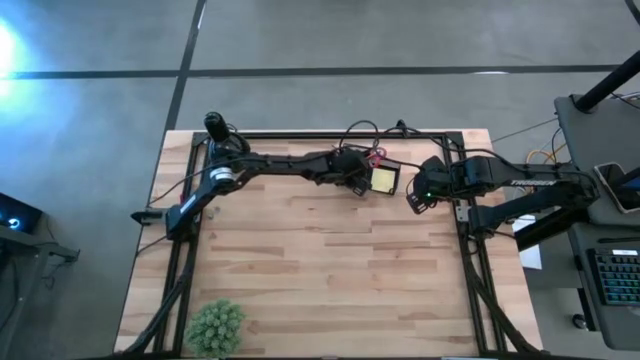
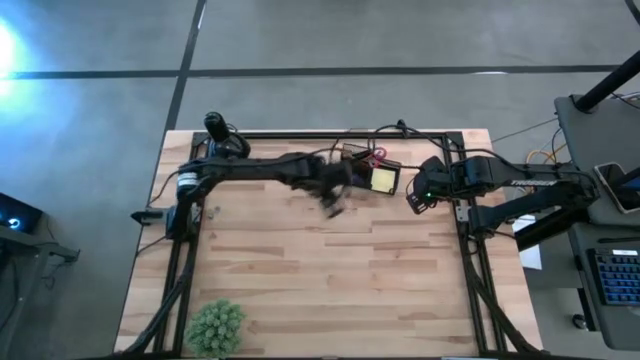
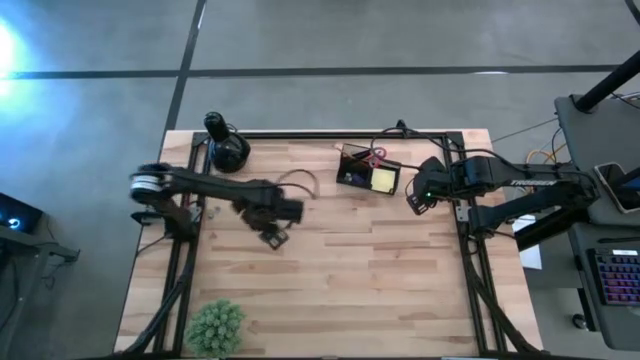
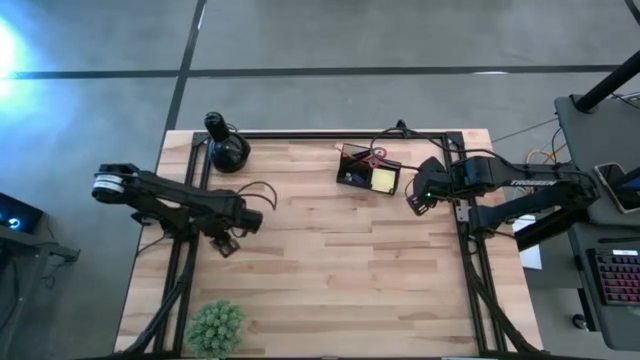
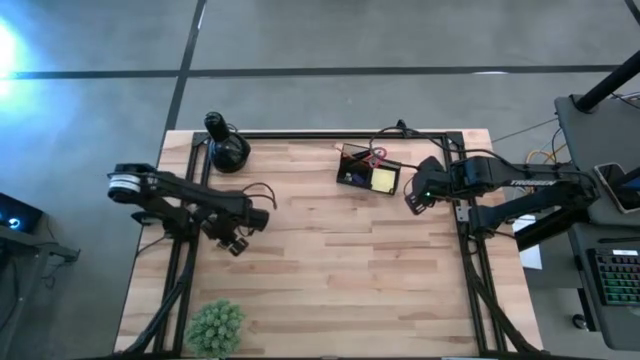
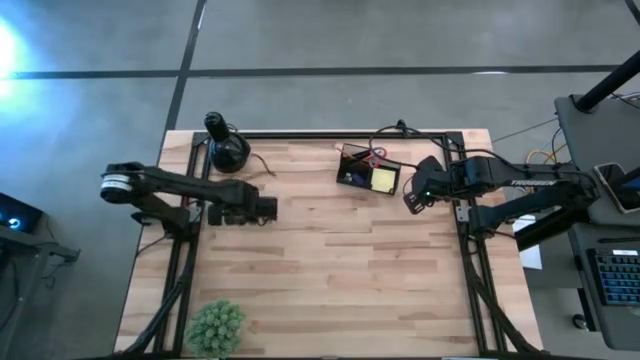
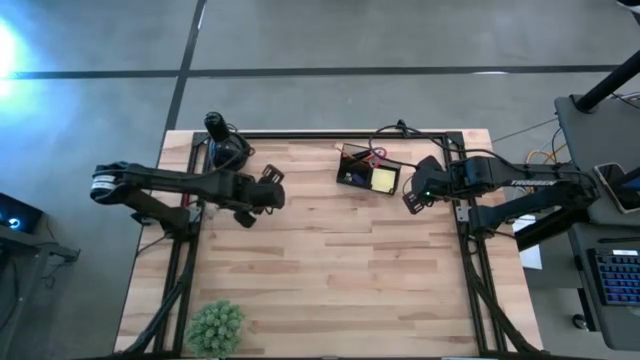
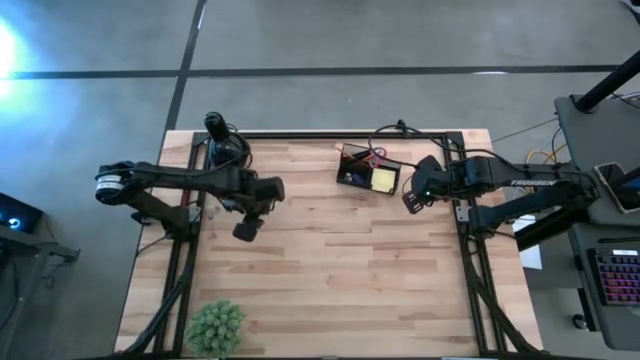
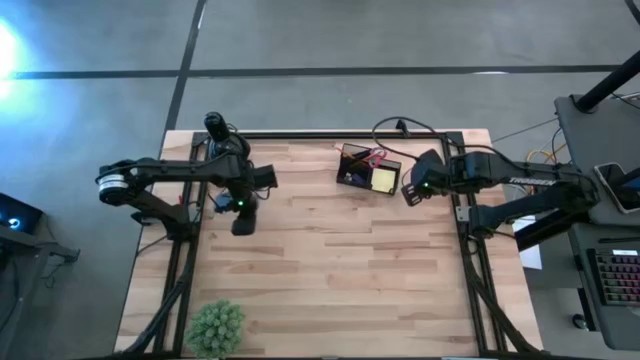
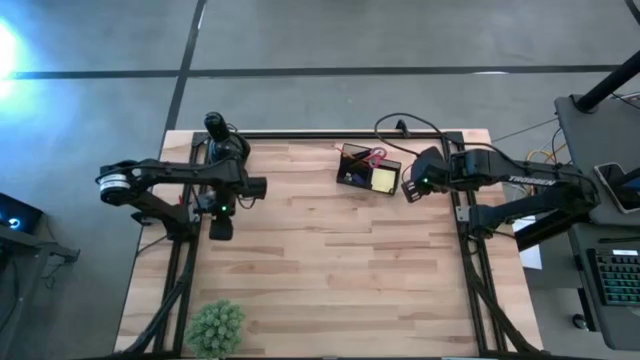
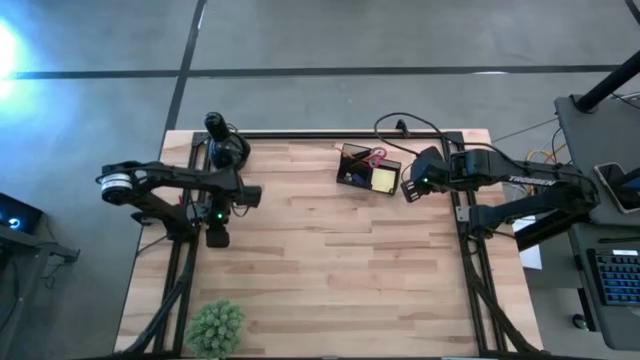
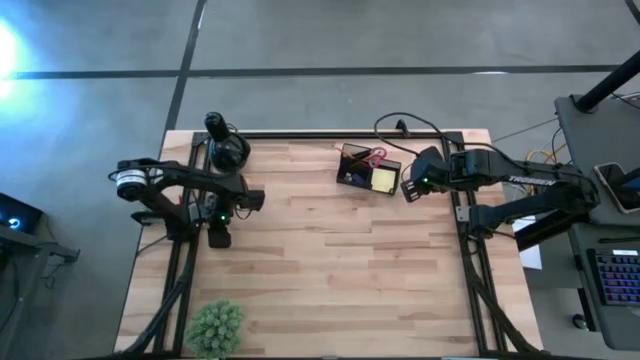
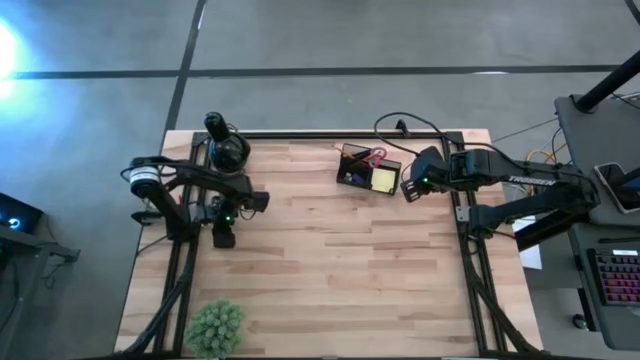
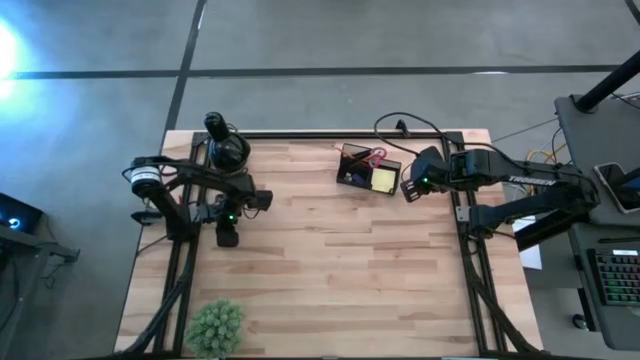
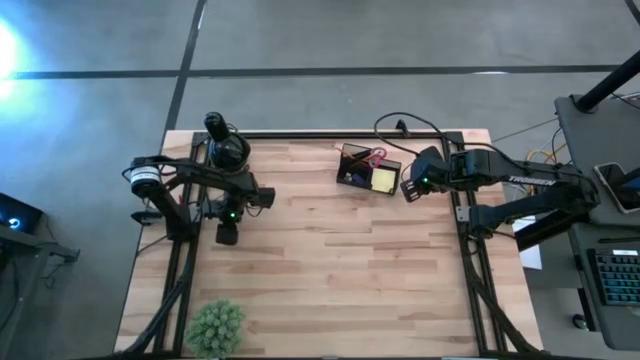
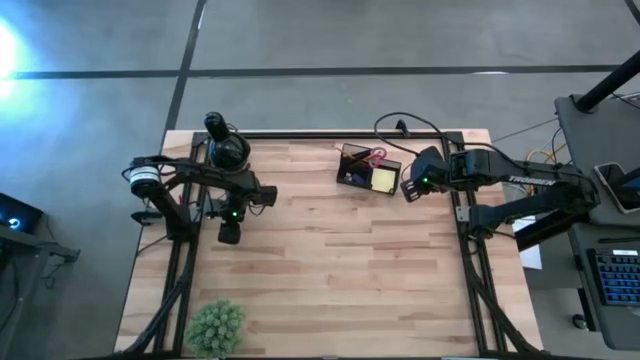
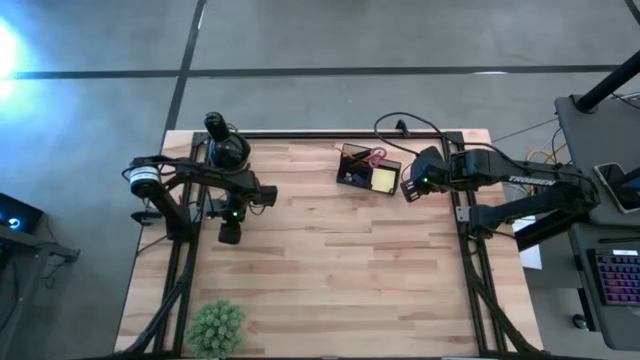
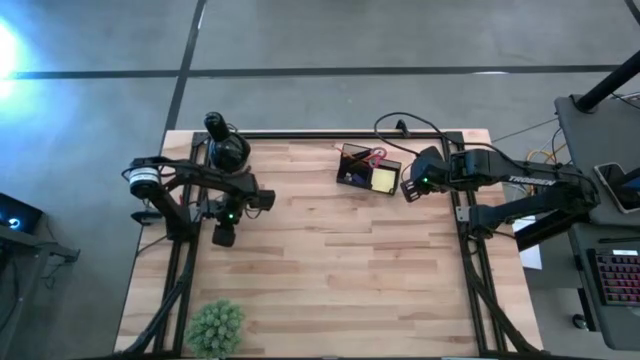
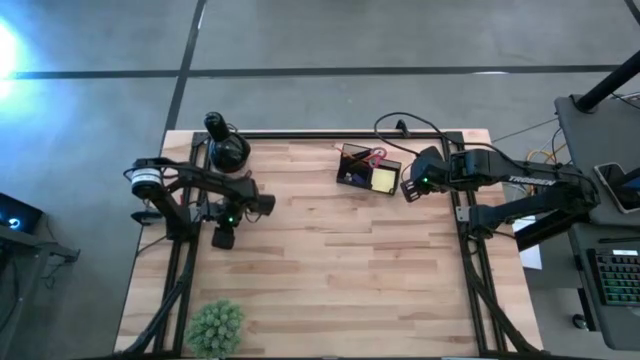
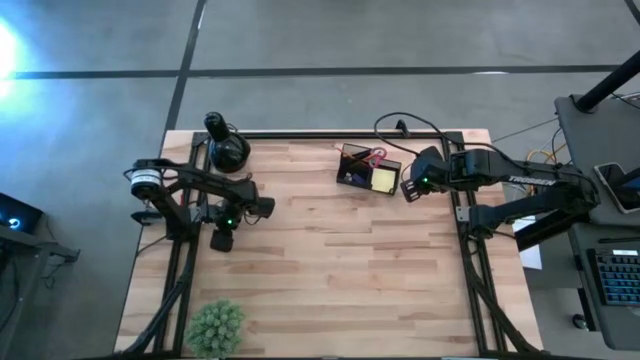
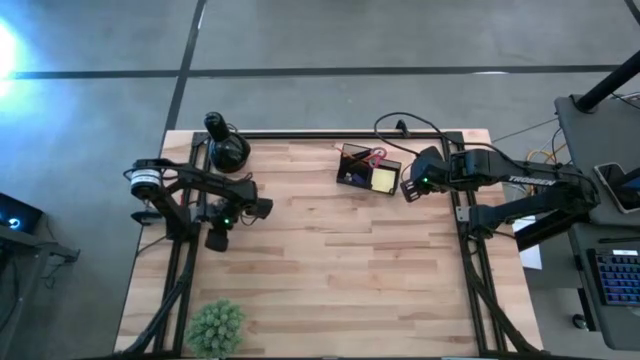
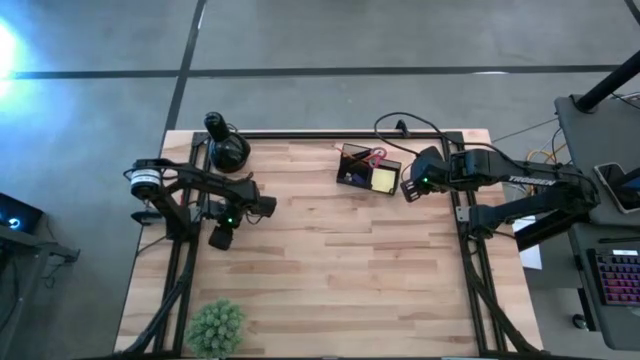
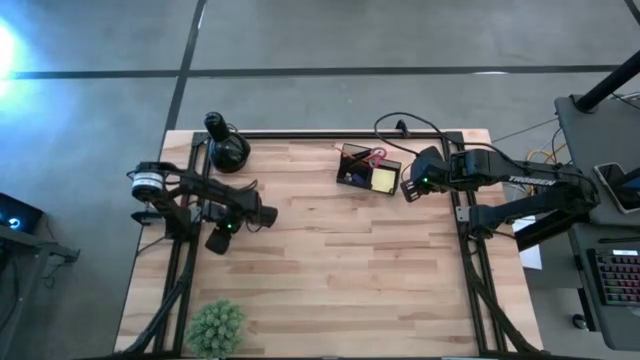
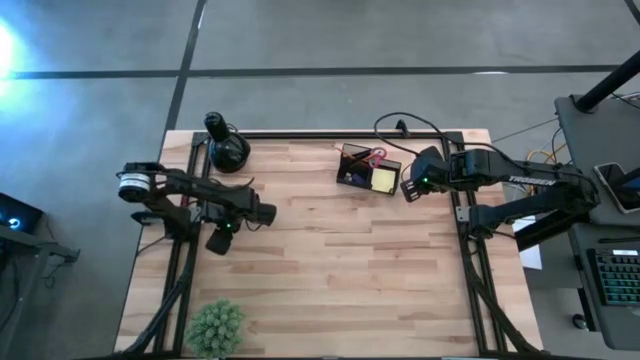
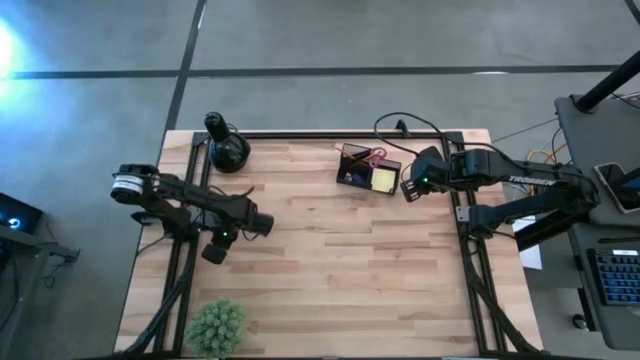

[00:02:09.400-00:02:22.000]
Task: Pick and place office supplies into organizer
Put the pink binder clip into the desk organizer

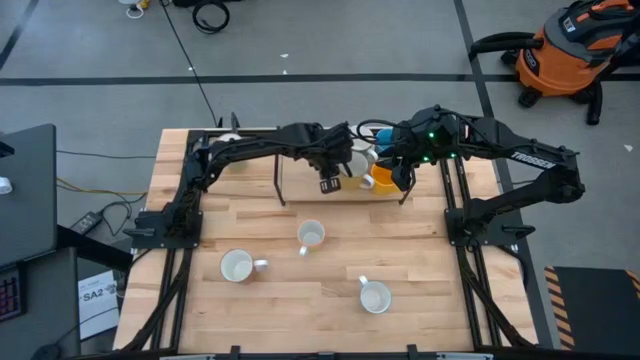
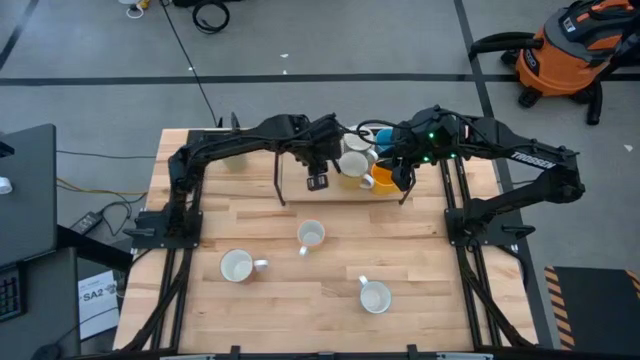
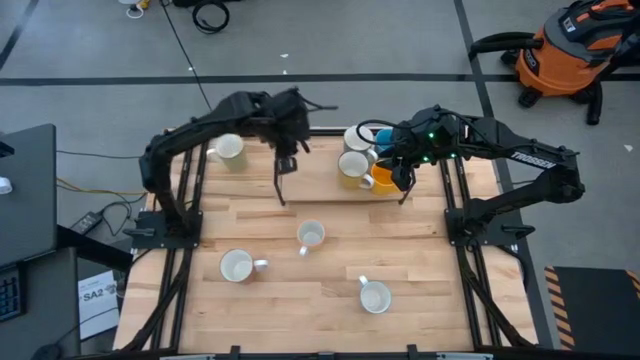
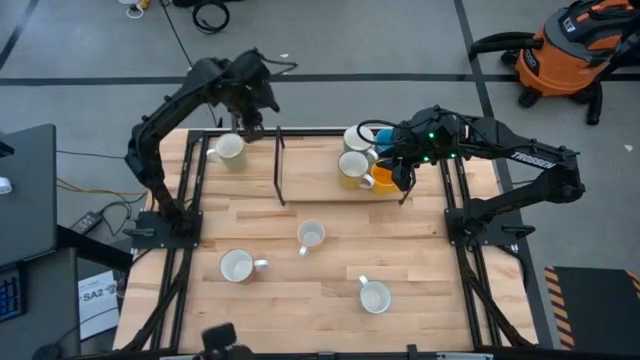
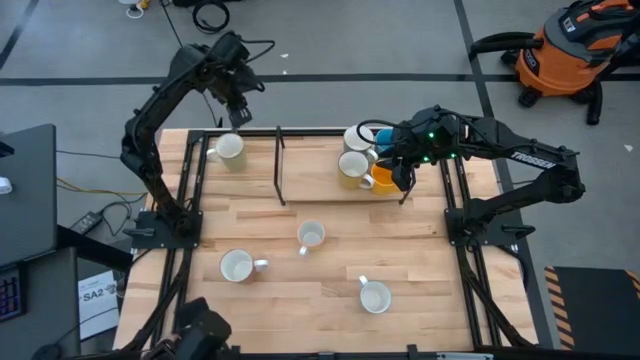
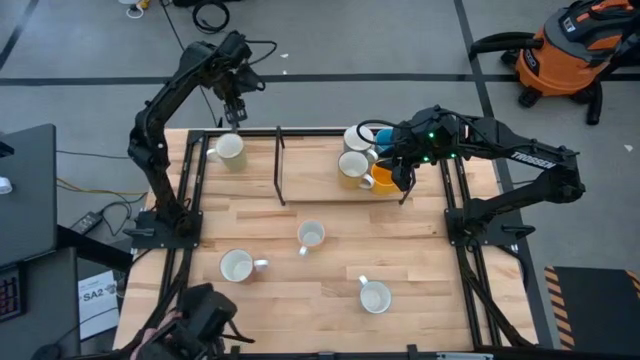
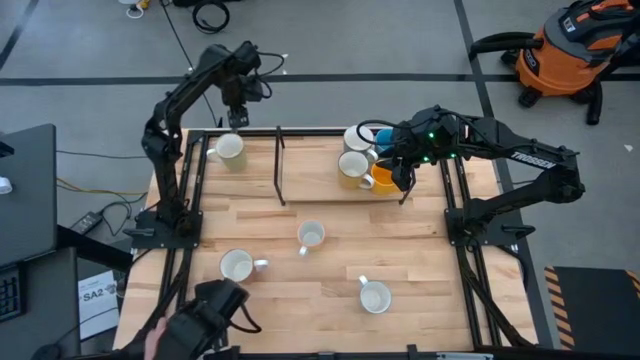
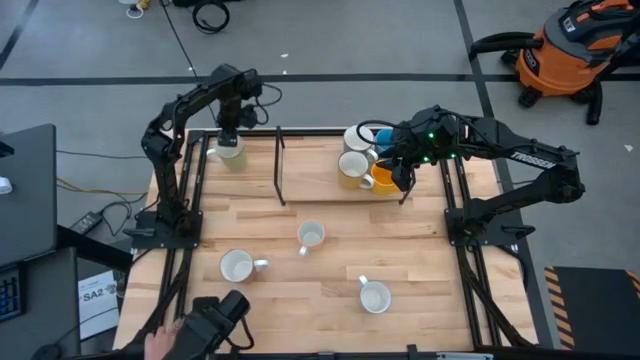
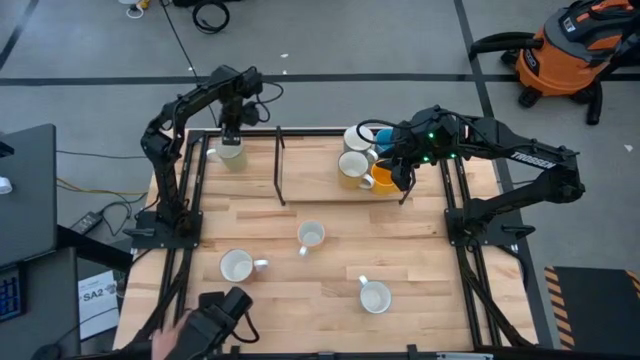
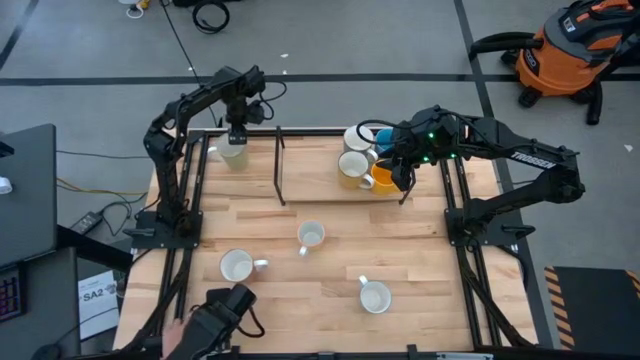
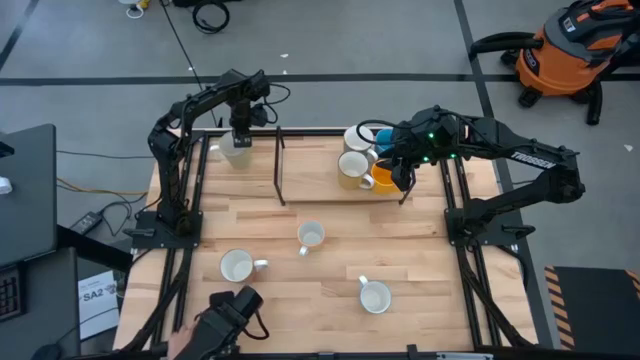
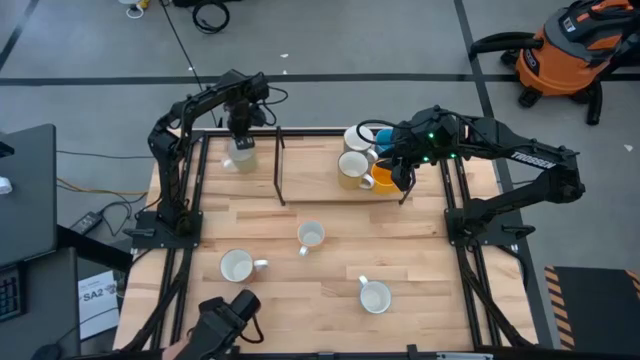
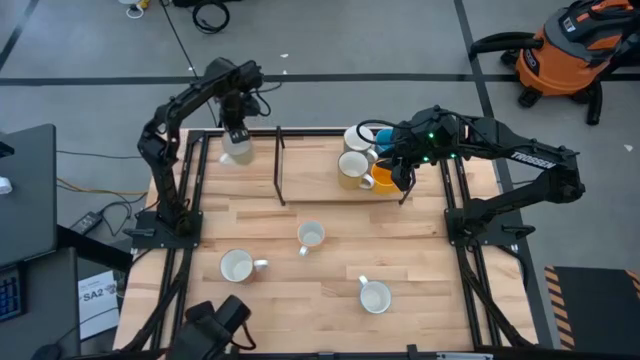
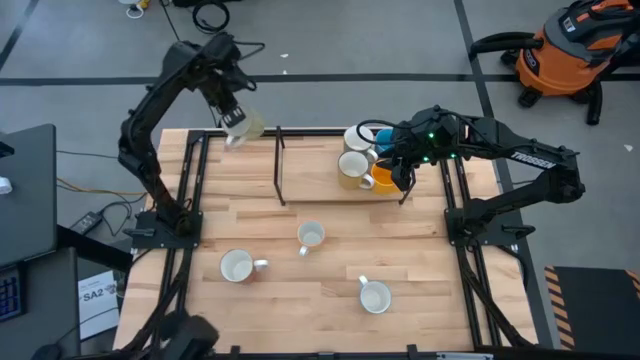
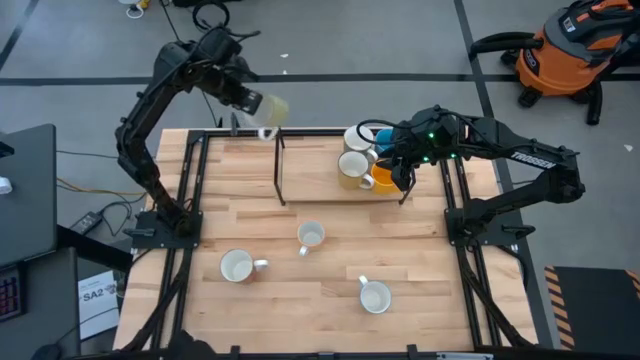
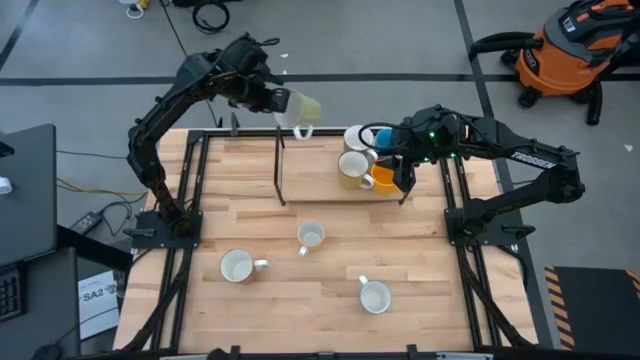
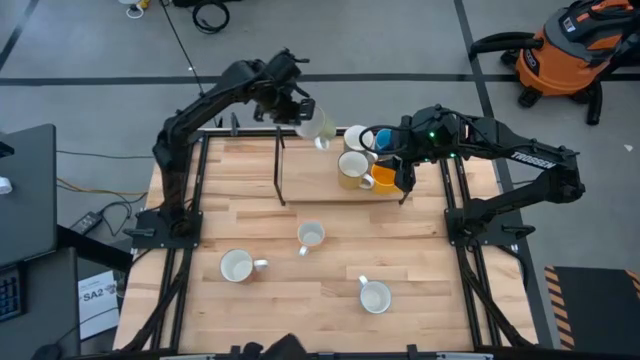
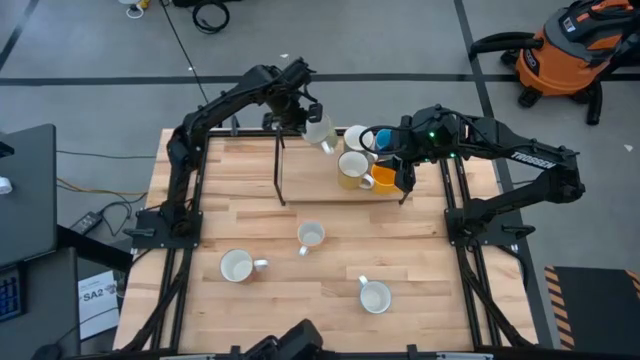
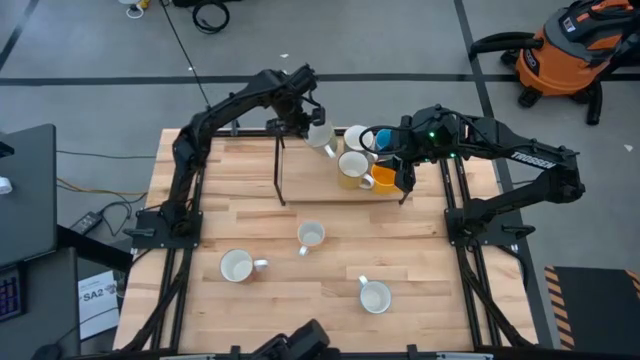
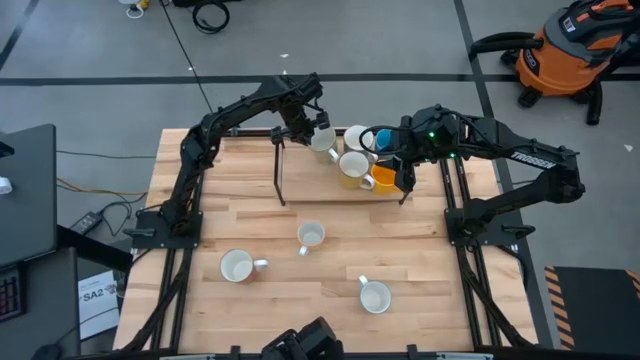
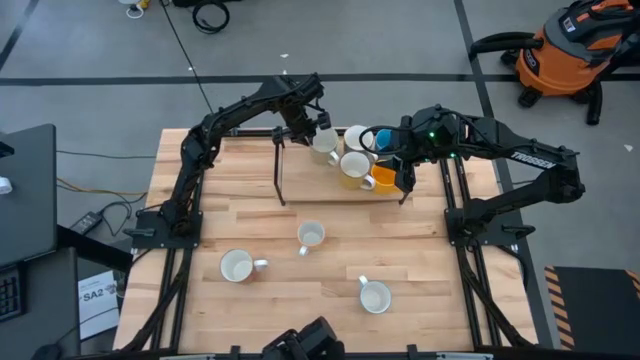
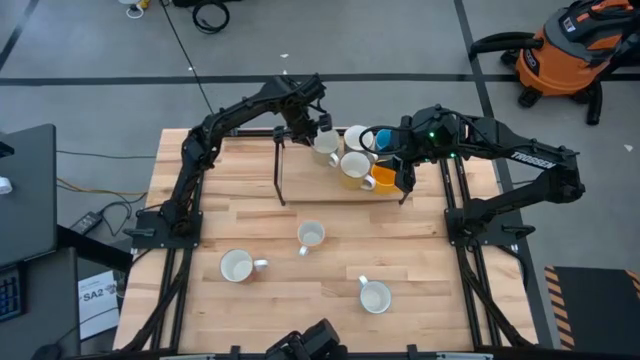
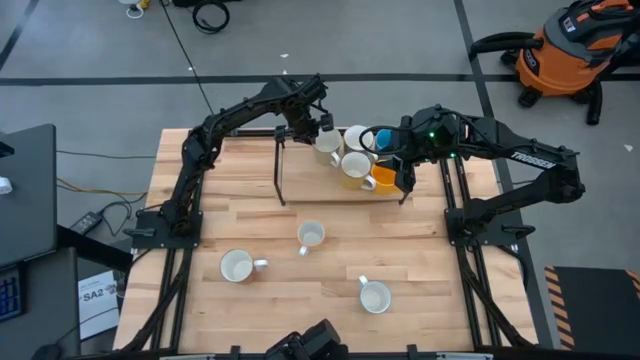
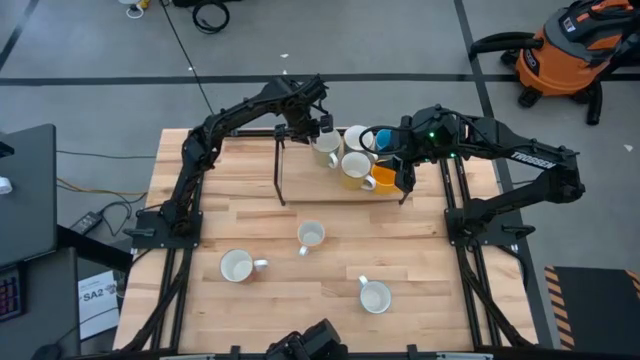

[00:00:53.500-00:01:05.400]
Task: Place coffee mugs
Put the light green mug on the shelf
